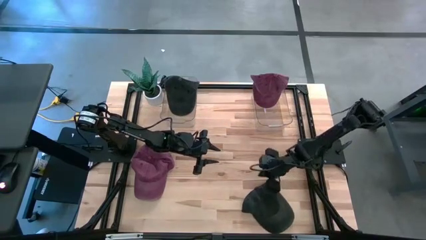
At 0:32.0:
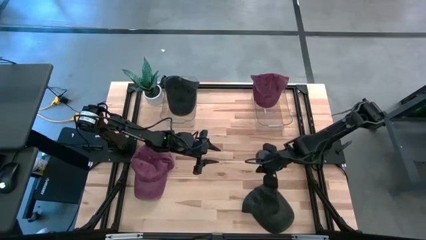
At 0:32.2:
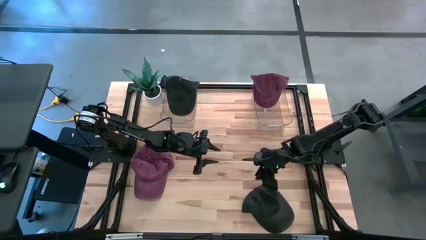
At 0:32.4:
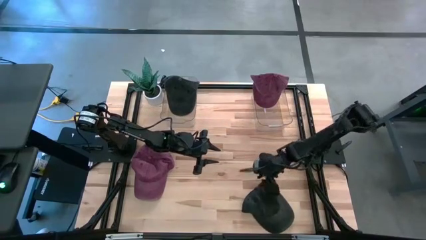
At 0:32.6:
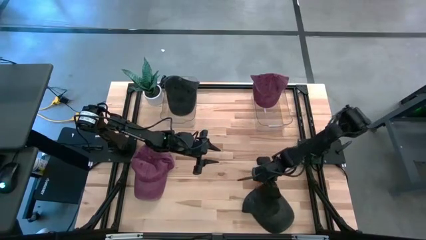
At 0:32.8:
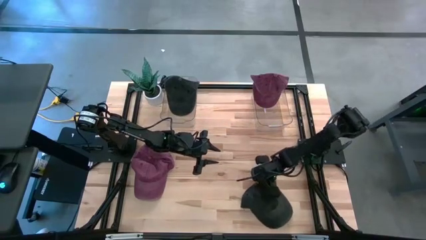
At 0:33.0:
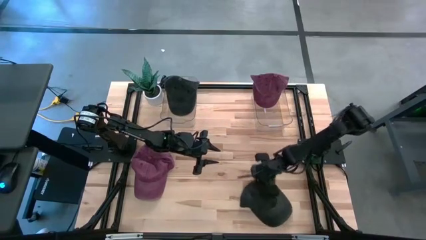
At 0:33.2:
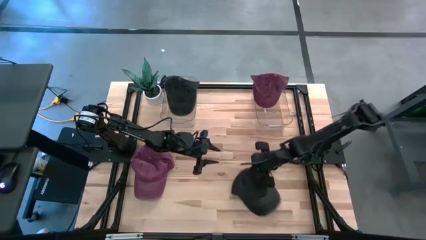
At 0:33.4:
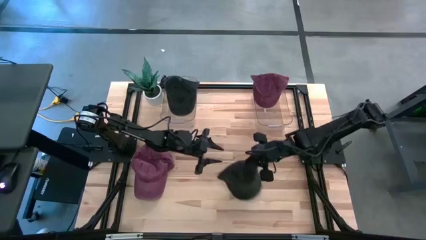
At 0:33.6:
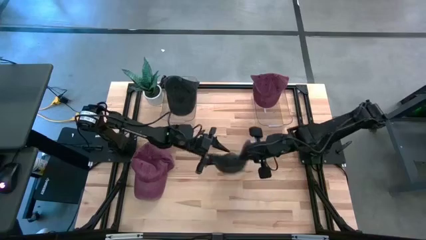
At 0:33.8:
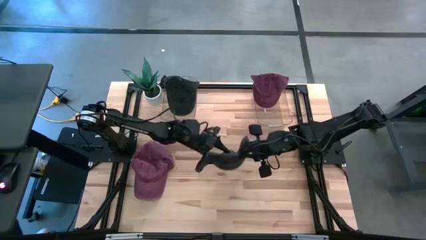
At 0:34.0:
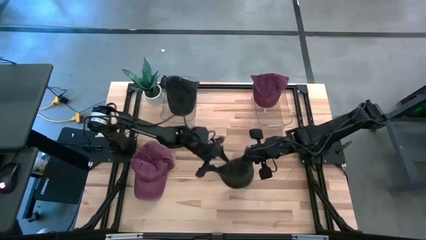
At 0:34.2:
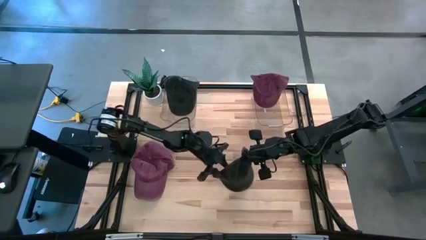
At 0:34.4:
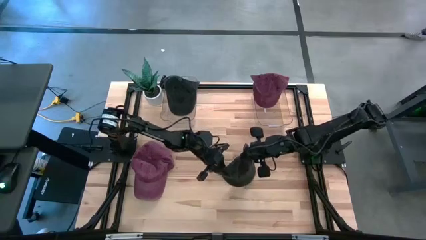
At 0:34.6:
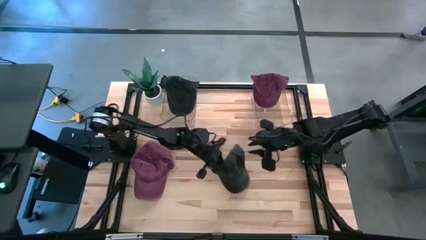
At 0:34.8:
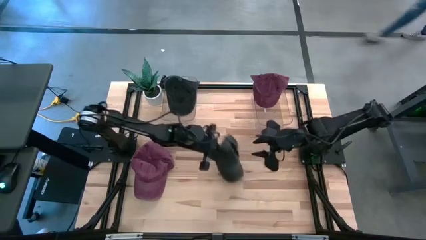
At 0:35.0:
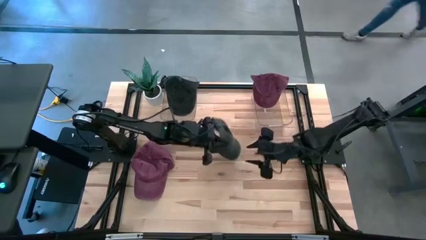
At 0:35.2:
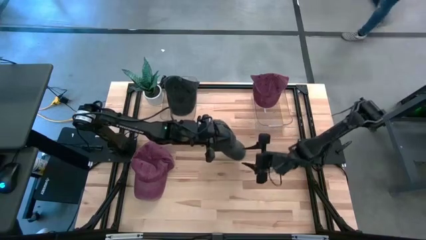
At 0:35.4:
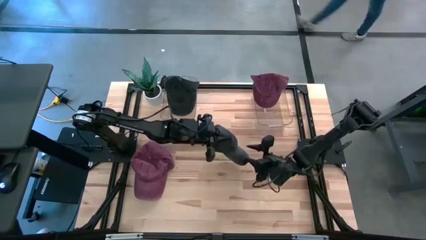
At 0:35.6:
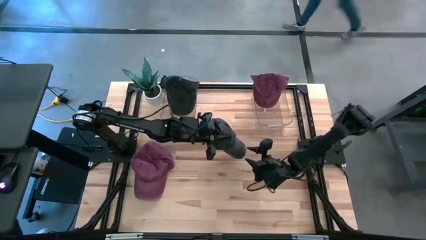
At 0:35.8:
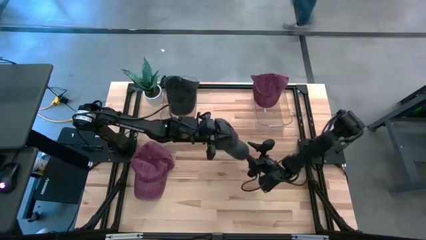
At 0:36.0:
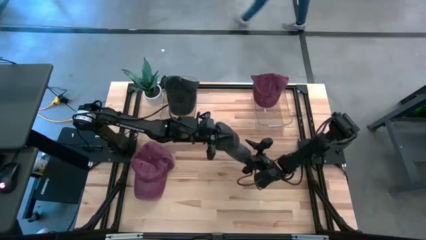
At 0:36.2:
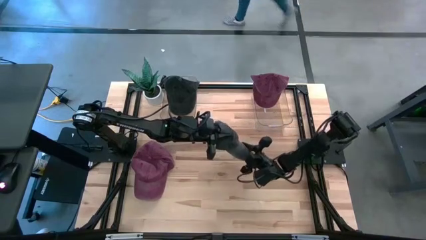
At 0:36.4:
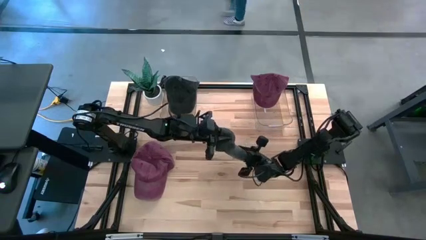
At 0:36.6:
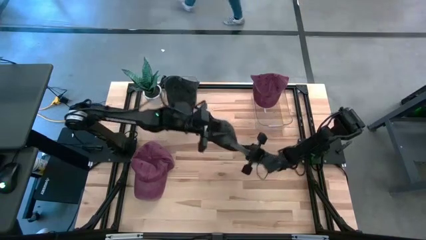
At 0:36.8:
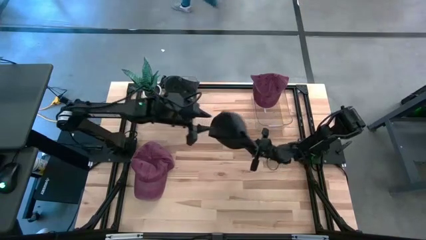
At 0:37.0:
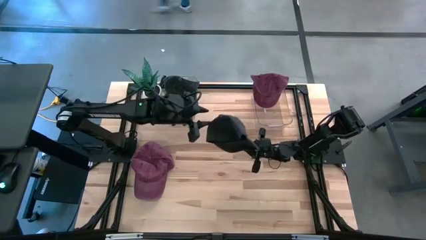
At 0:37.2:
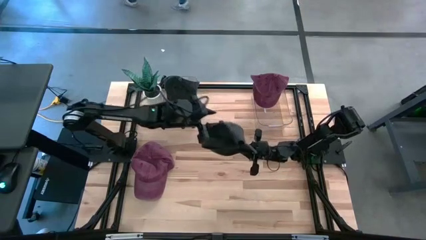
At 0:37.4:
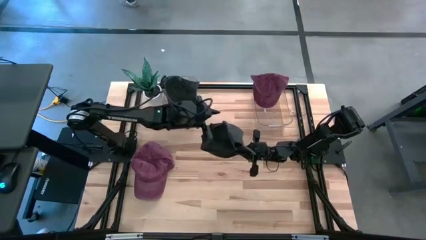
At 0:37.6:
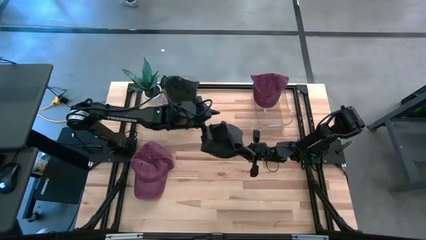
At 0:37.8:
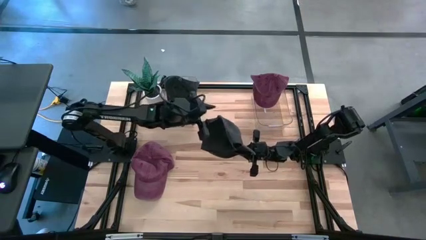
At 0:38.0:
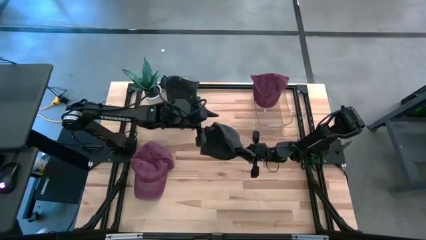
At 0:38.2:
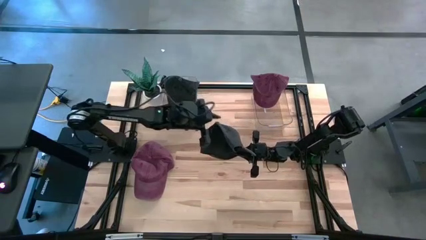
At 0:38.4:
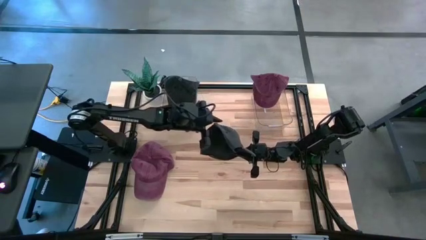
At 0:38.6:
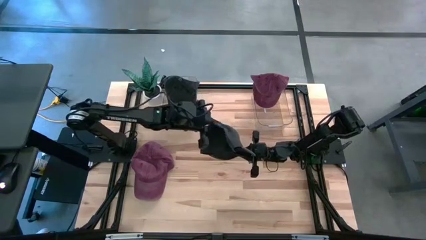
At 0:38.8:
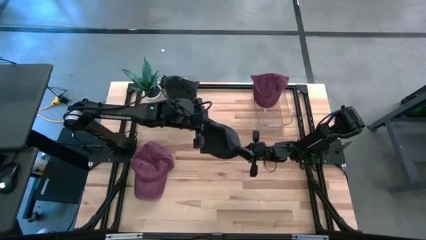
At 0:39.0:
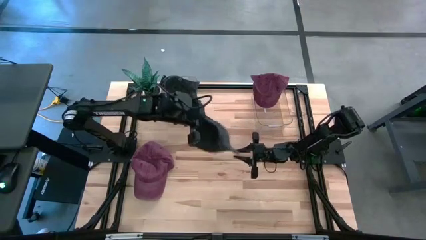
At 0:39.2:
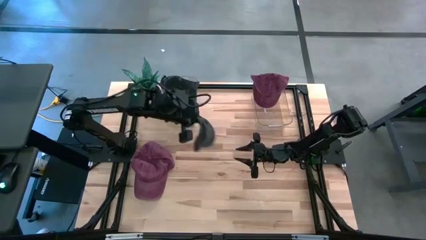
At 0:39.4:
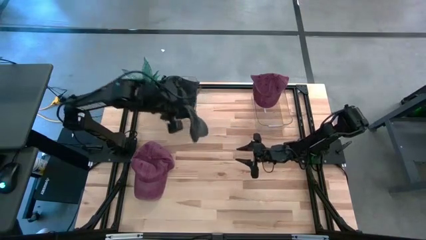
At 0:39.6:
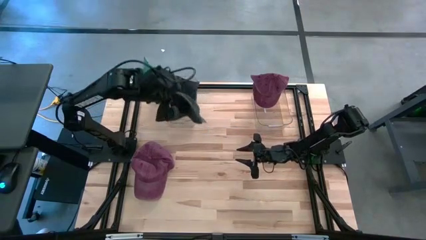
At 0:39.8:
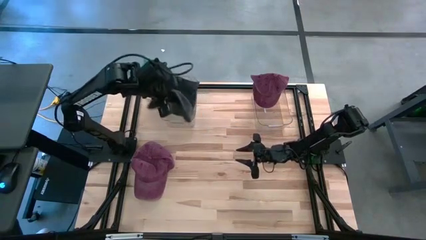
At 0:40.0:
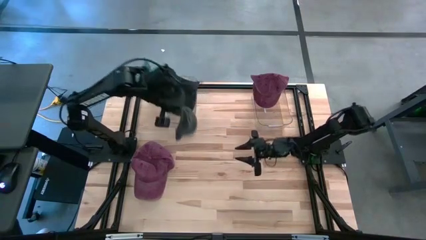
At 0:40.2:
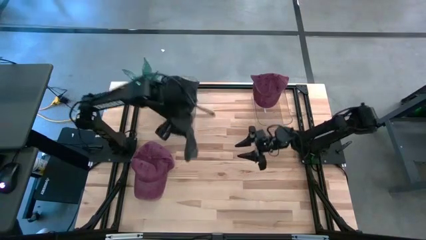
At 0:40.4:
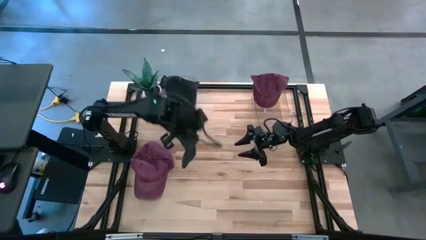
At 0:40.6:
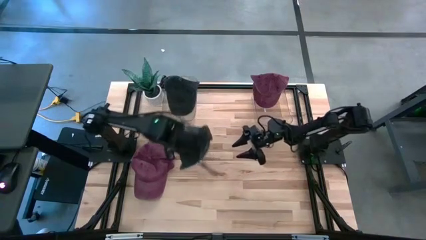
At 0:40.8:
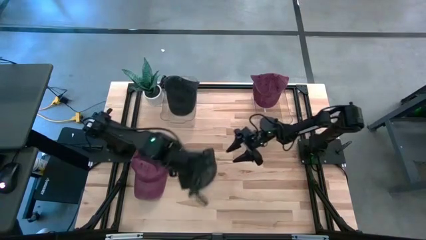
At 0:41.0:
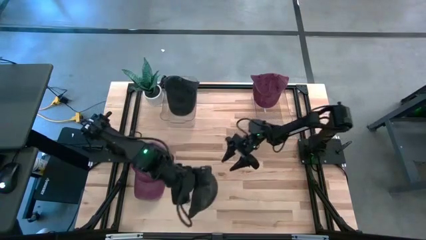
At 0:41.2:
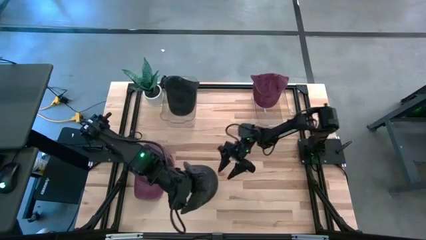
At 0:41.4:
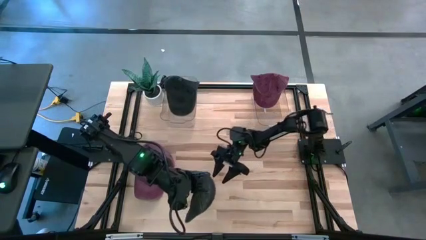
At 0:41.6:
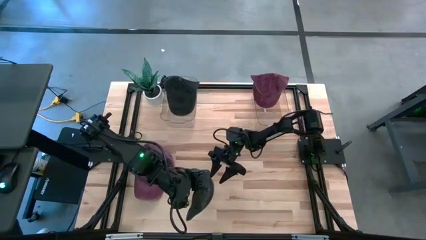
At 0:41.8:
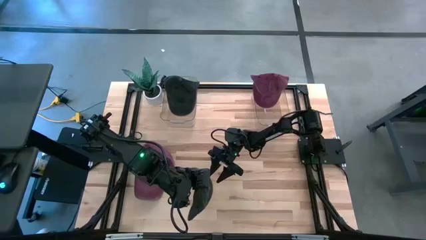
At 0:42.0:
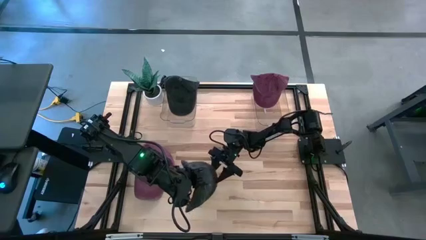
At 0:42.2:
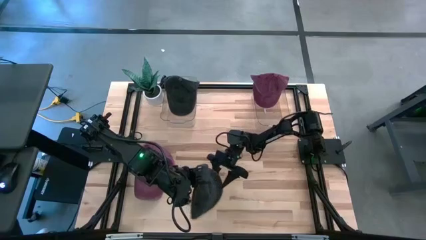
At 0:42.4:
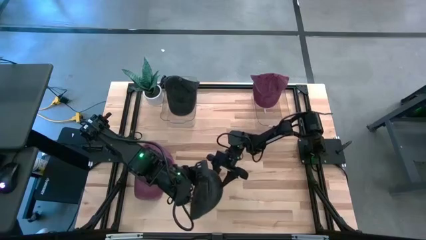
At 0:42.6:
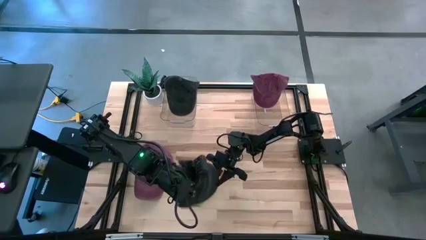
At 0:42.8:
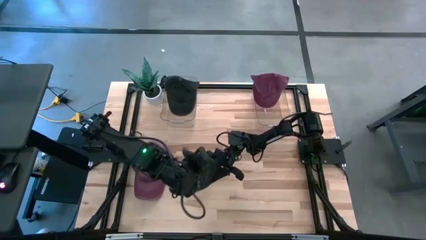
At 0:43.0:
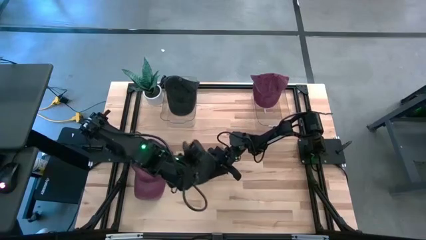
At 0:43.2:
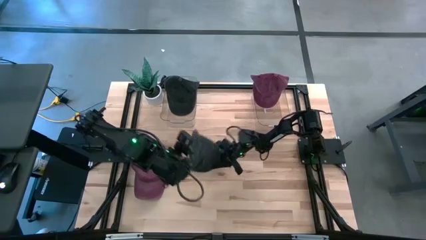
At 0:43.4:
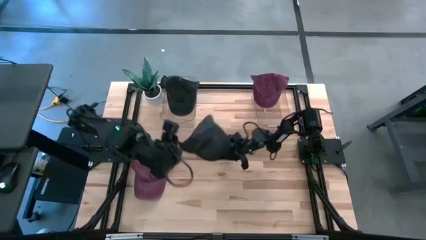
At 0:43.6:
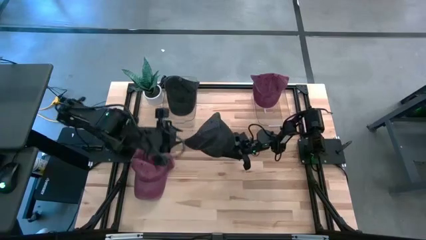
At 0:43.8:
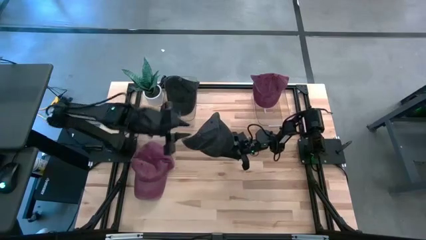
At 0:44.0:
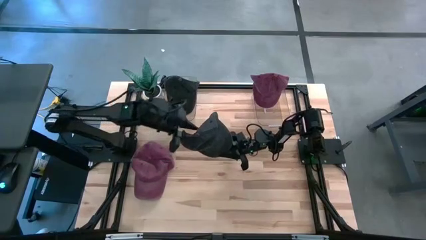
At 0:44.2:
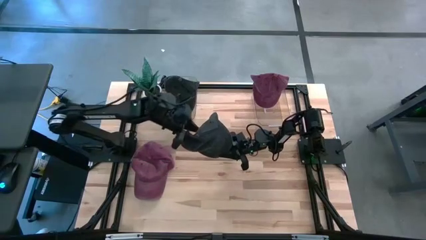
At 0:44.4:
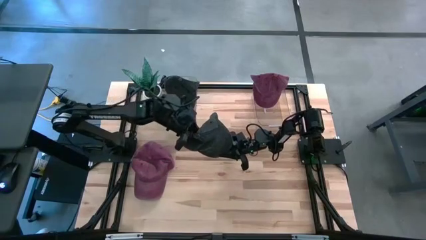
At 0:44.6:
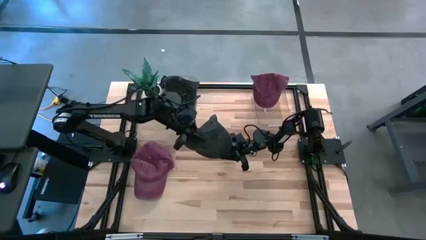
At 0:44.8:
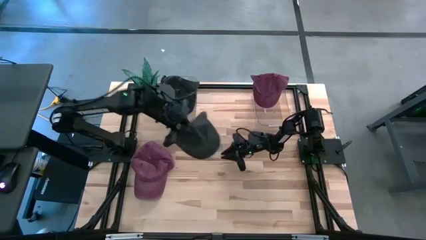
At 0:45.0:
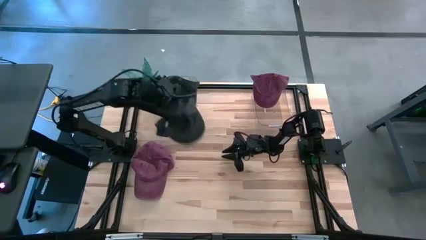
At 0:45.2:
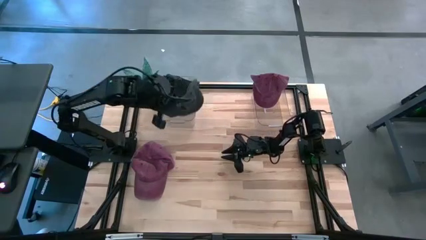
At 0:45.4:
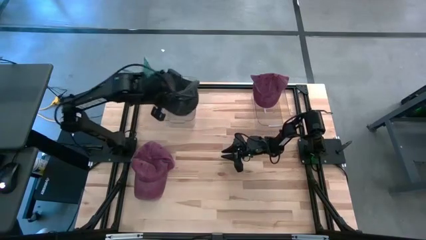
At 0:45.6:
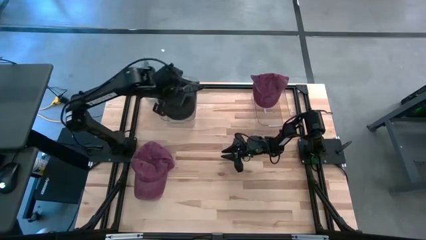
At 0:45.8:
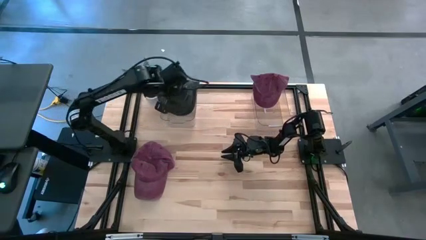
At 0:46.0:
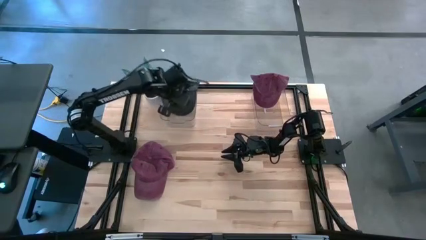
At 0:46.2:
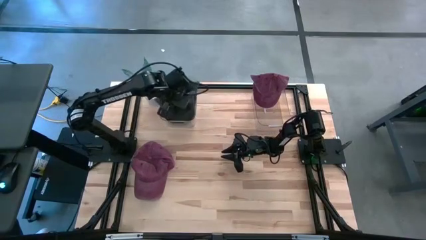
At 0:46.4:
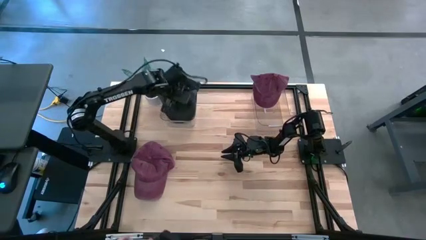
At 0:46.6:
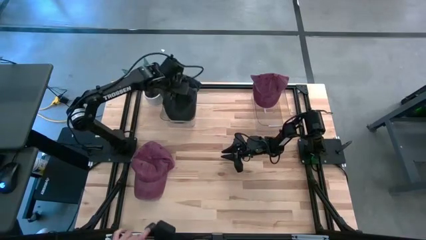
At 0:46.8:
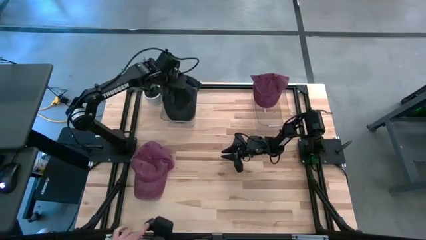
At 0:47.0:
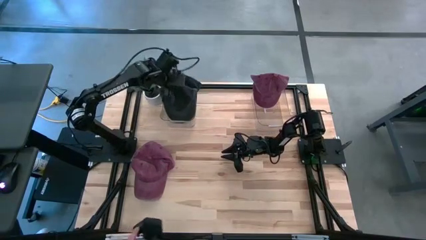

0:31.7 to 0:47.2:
Task: Pick & Place hat
Put the black cap into the left transparent bin

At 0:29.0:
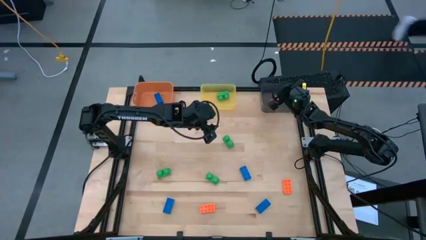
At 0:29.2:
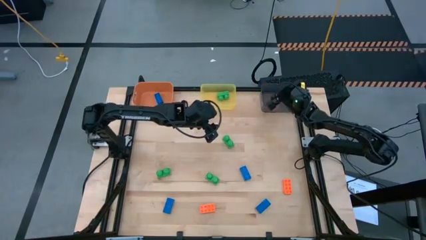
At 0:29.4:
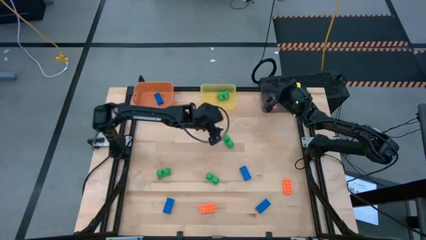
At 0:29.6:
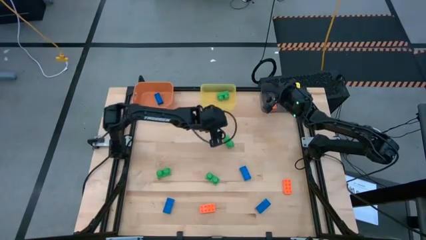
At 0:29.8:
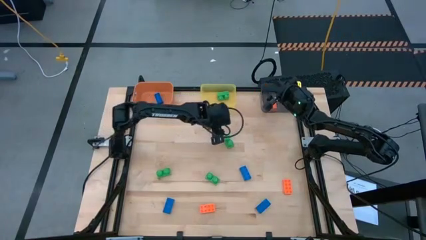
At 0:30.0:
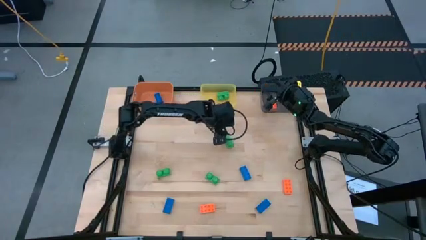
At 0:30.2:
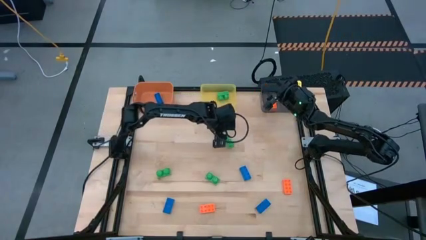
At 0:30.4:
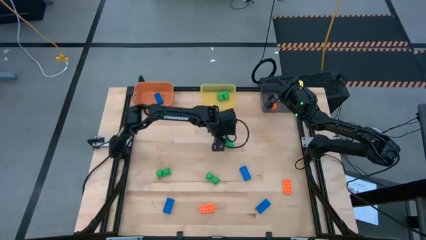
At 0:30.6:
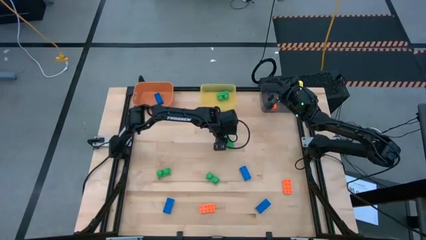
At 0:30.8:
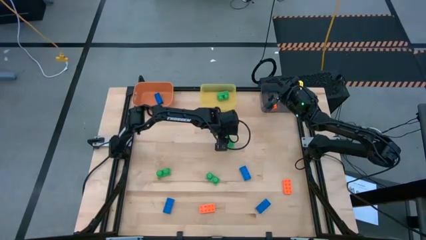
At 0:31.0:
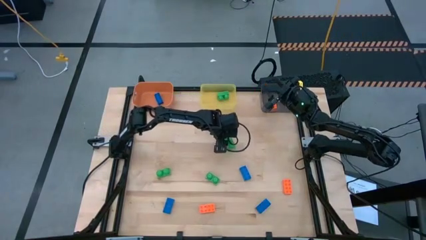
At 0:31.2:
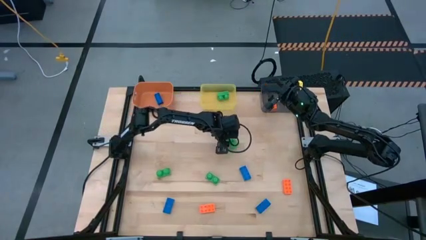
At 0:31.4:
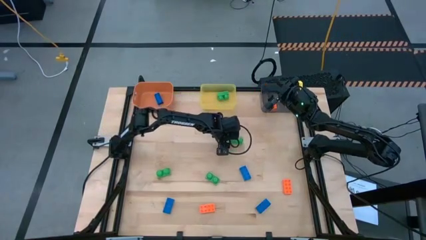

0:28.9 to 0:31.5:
Task: Sort & place blocks by color
Put the green game piece into the yellow bin
